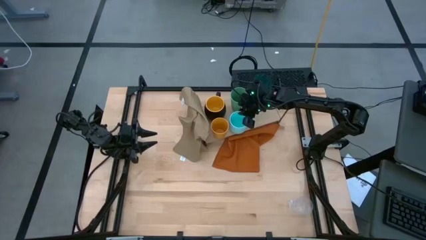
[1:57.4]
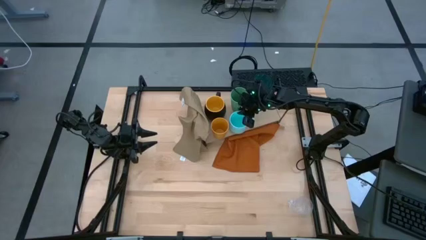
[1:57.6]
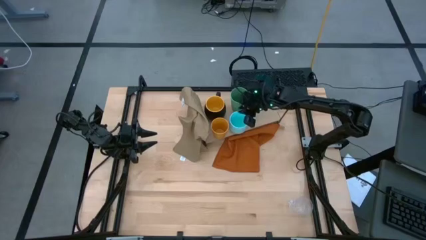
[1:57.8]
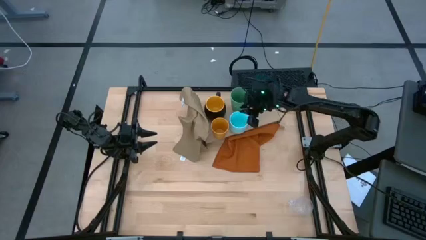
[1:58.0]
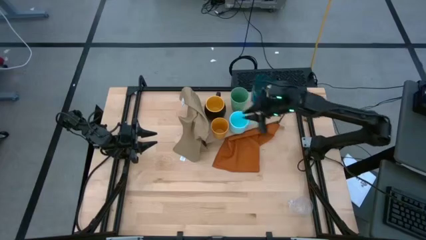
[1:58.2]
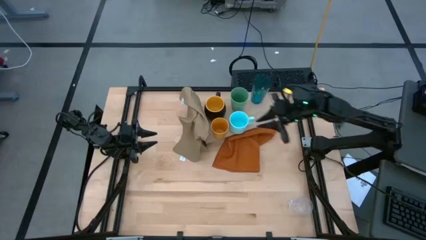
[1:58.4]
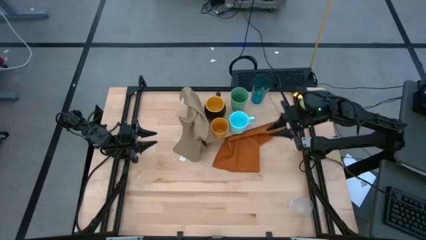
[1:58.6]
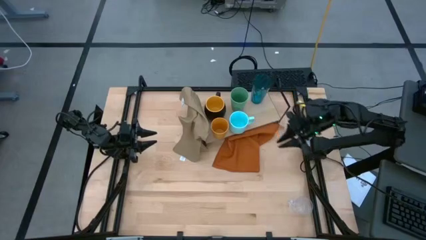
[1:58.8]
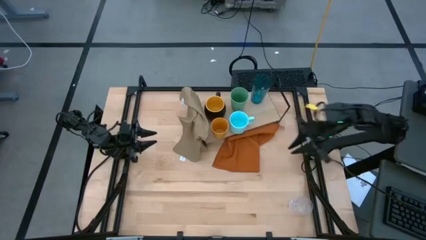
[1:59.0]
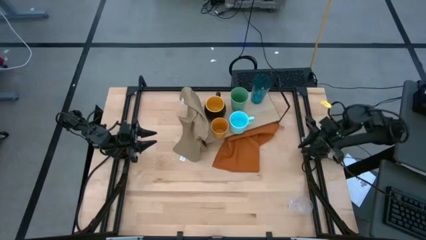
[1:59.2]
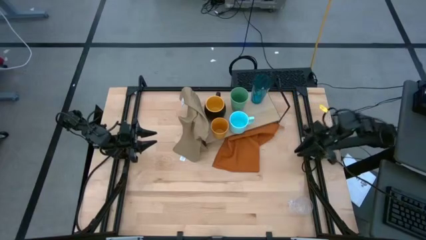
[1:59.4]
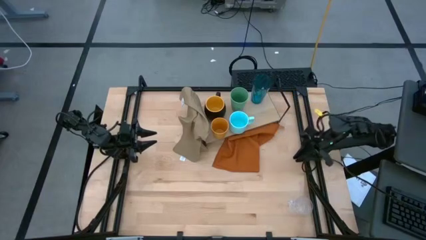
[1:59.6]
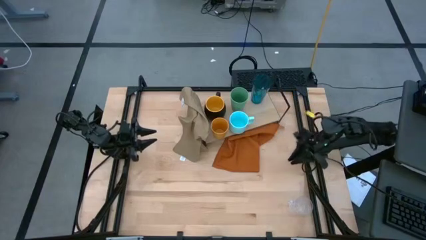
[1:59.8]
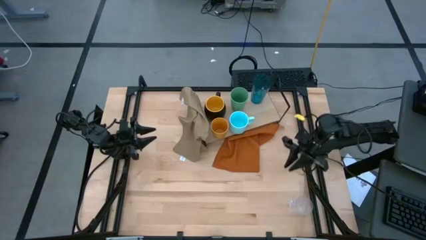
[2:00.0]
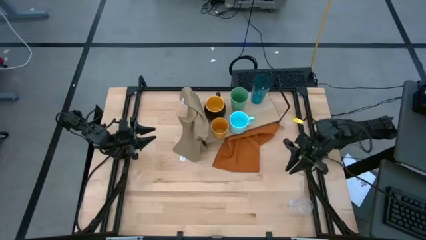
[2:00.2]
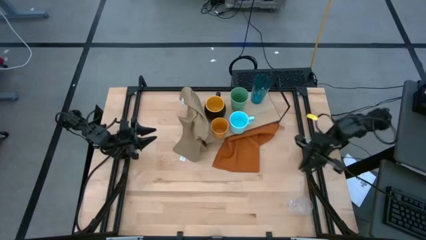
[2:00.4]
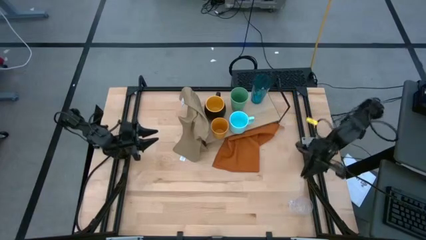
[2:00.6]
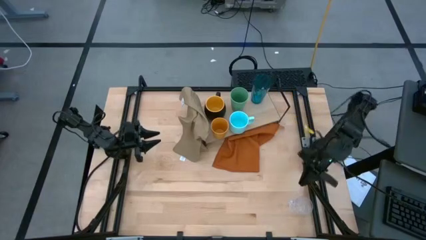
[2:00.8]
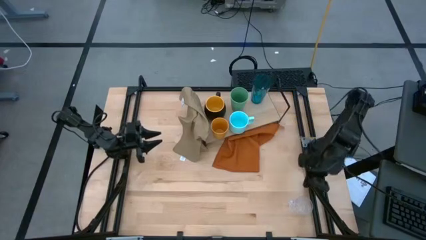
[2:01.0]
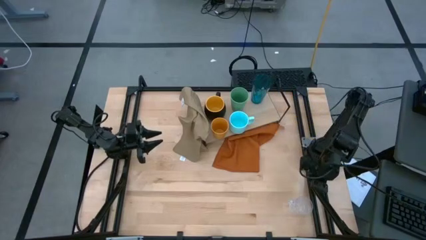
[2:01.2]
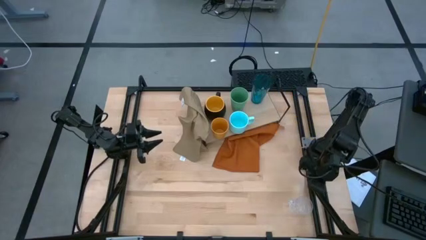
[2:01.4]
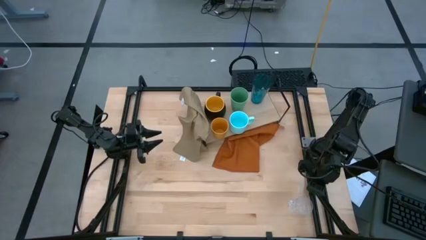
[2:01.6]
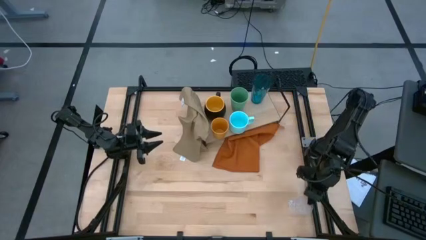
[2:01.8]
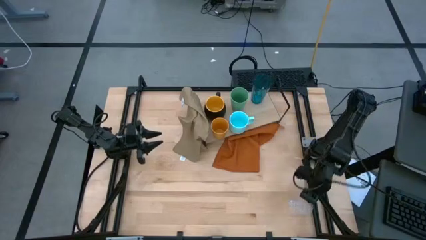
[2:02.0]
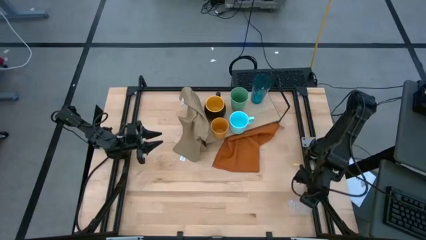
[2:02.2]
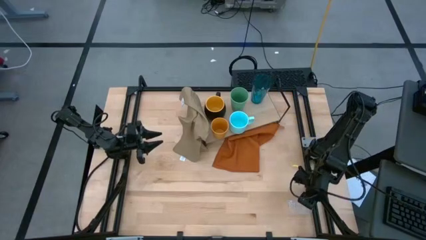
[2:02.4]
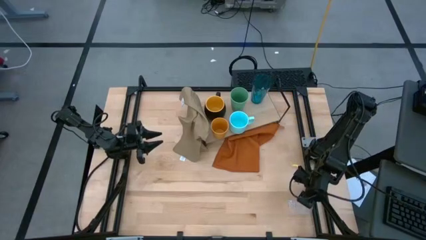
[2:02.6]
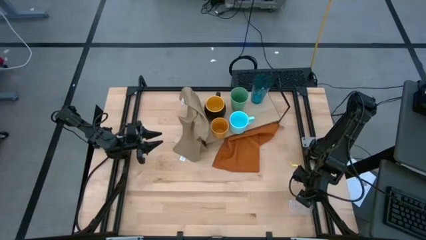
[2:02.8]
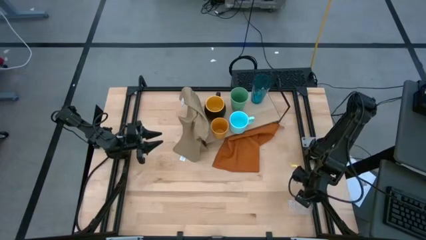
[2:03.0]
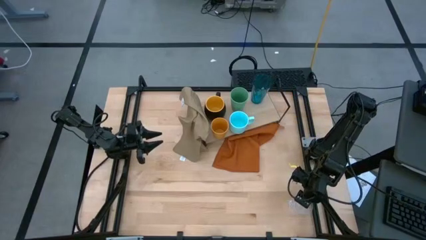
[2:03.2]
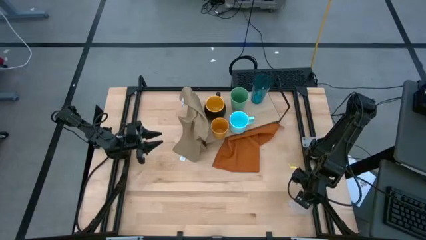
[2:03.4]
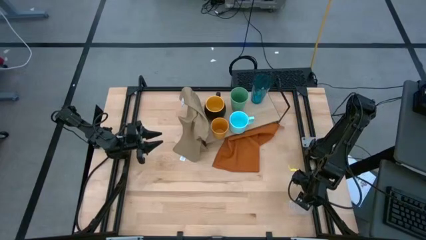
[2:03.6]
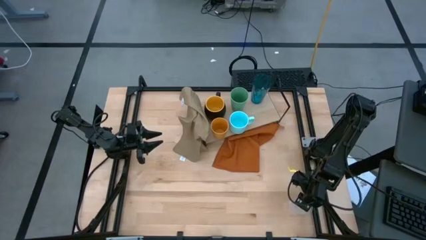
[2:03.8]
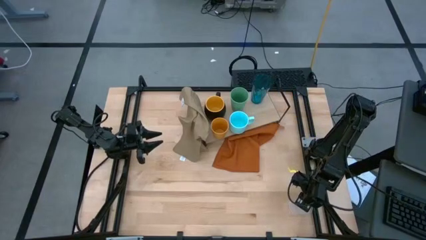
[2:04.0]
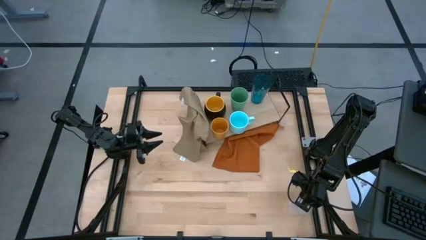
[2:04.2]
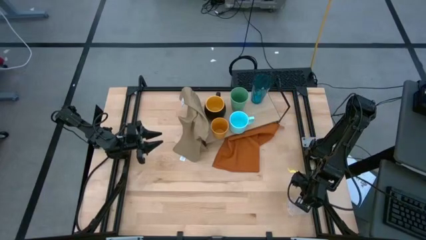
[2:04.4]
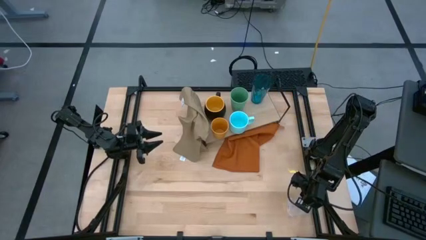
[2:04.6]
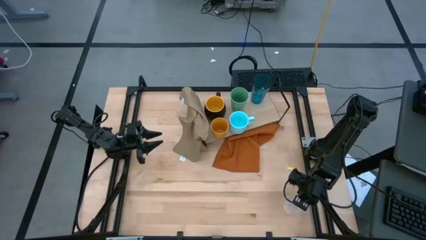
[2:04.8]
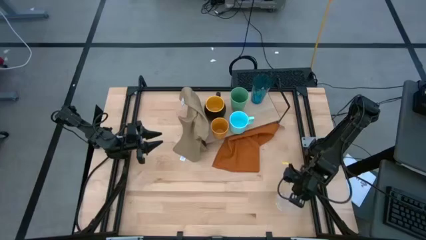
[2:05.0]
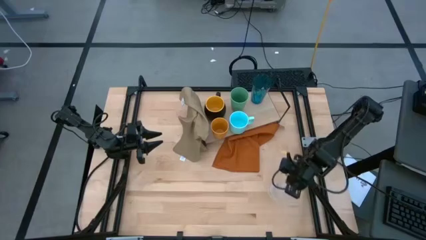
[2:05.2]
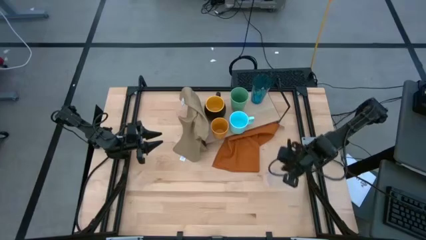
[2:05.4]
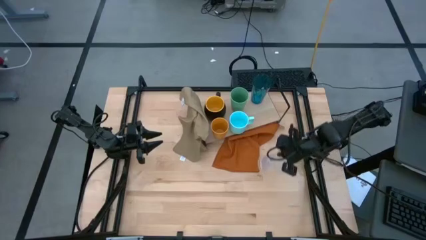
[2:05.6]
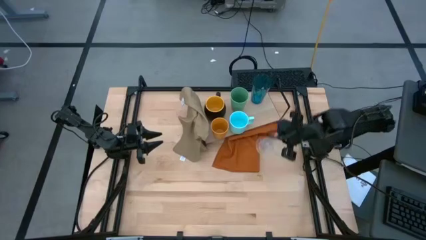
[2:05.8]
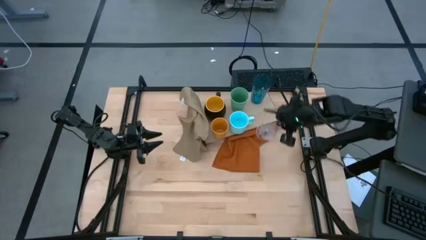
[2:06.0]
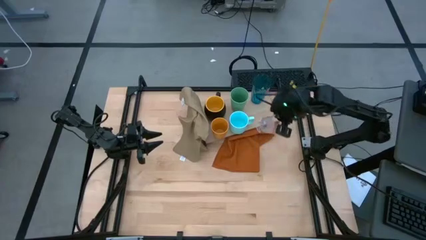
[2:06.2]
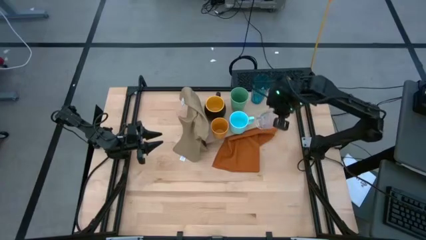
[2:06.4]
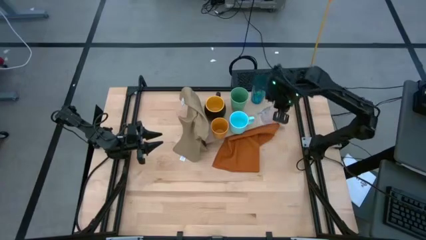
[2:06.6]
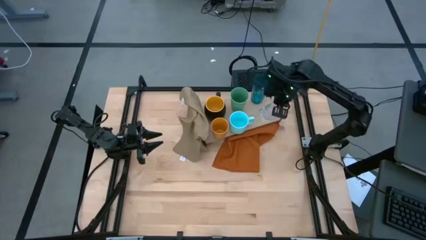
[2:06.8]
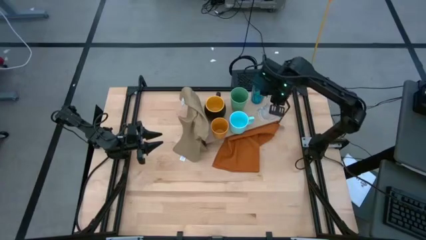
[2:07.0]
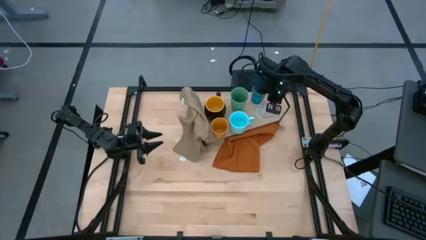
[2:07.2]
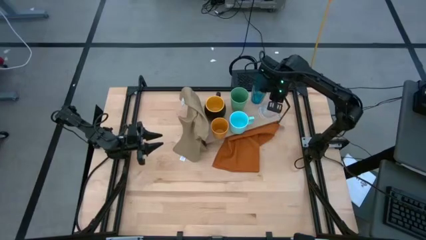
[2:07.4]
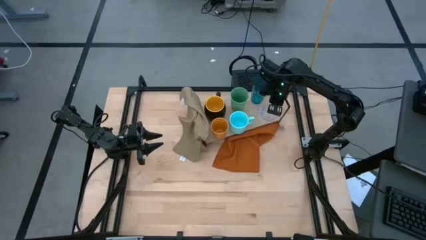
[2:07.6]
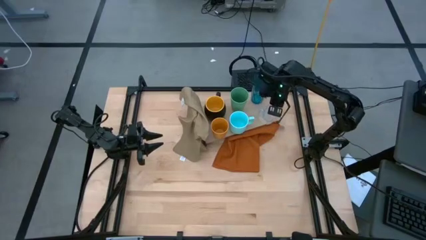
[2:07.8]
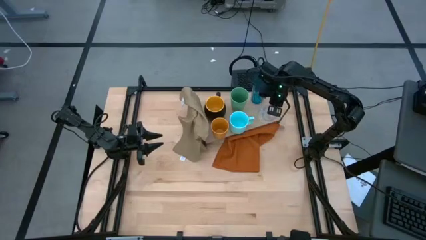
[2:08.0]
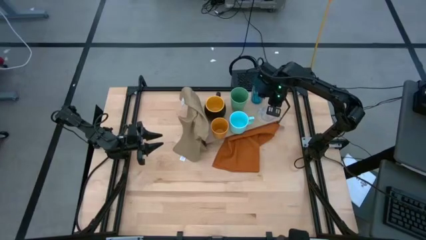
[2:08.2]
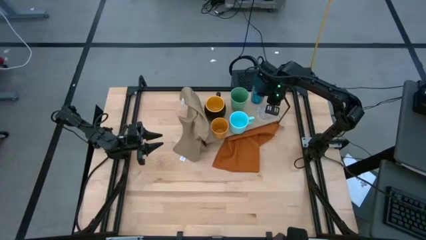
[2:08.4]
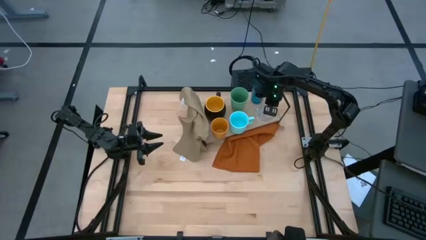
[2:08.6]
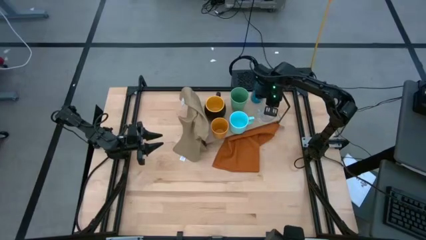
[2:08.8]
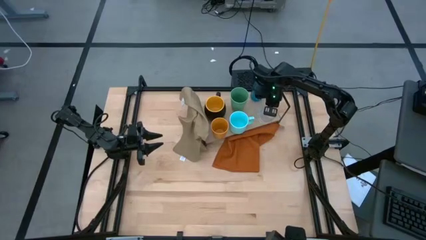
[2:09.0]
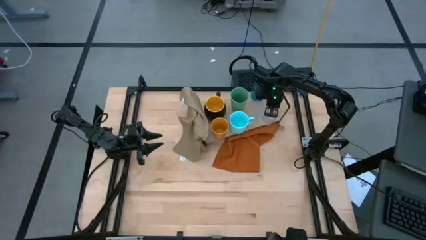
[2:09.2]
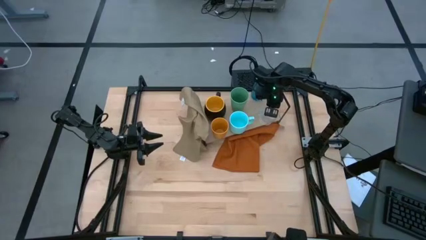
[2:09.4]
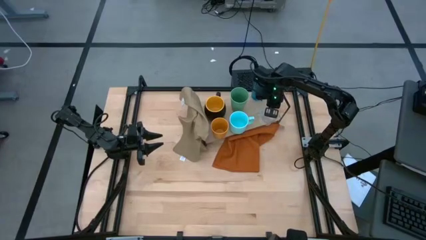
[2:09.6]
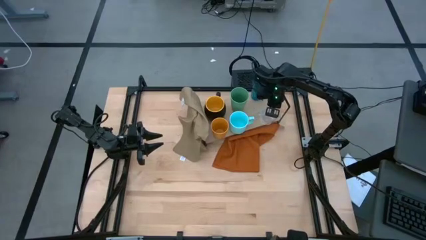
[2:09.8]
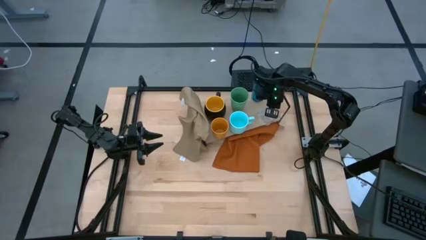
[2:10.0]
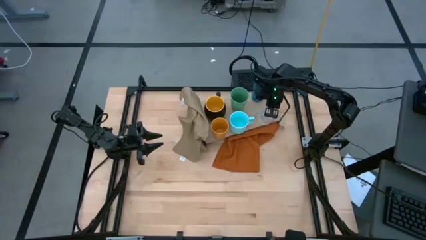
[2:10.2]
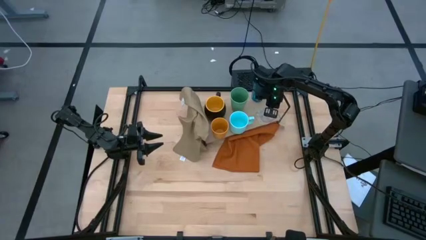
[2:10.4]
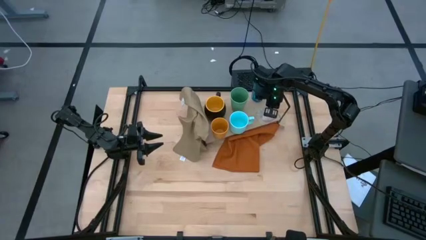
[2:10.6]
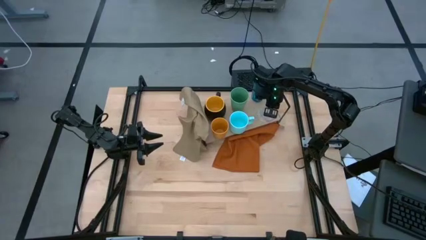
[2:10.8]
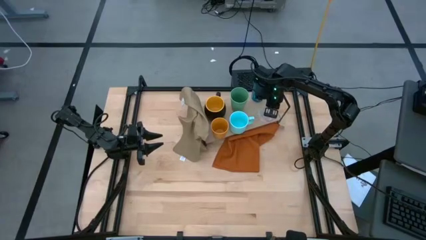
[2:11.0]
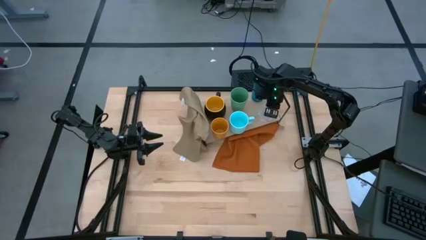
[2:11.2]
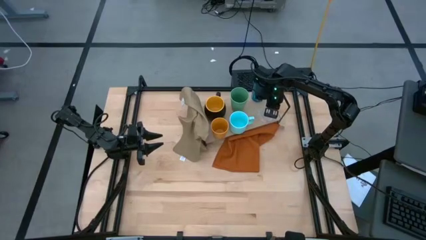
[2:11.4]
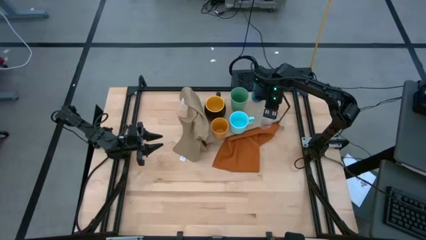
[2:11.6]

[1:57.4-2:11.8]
Task: Stack small to large cups/mugs on shelf
Put the transparent mug on the shelf
